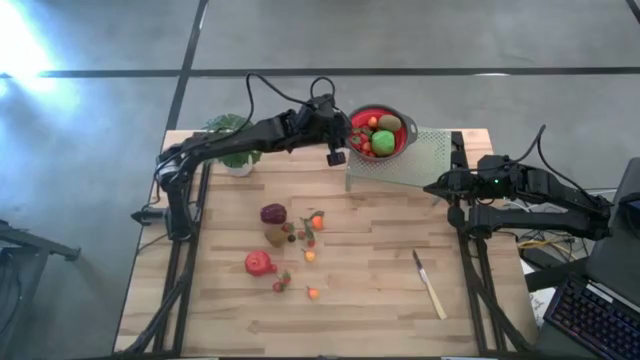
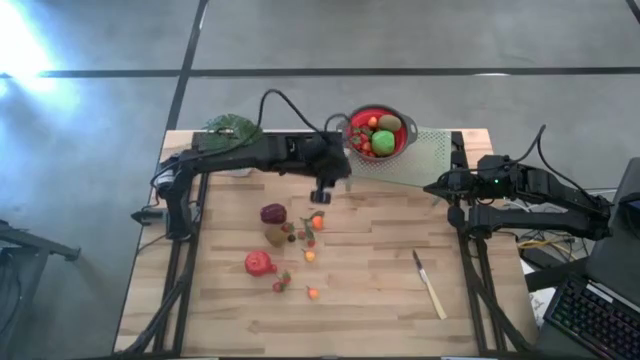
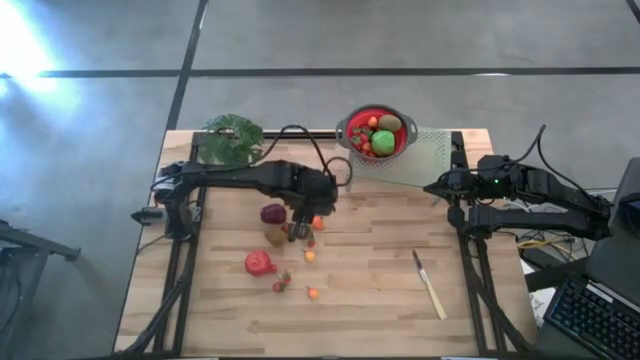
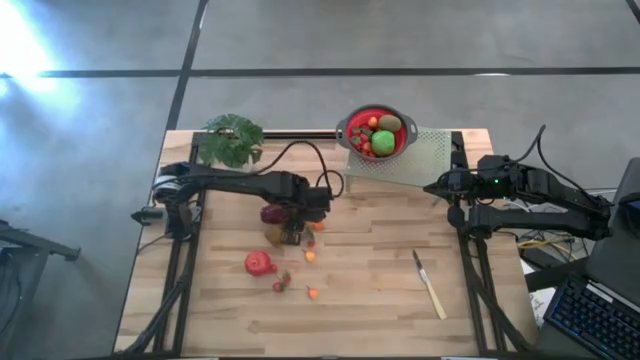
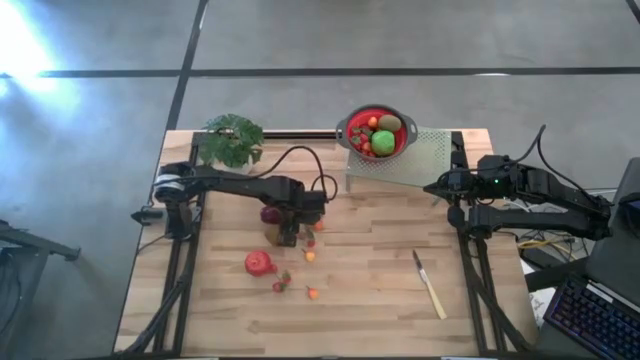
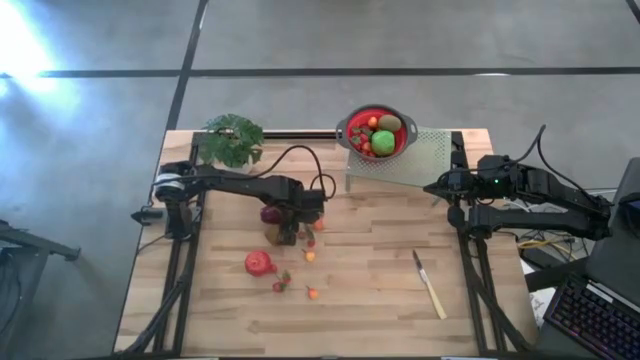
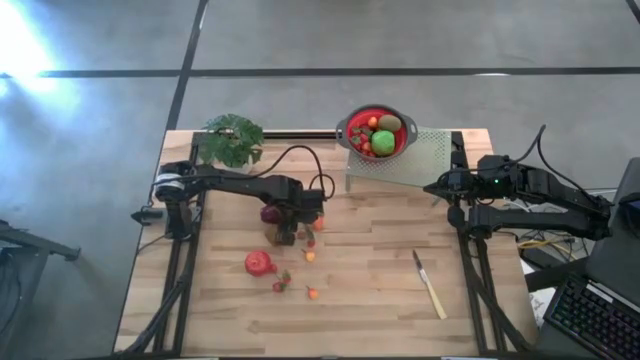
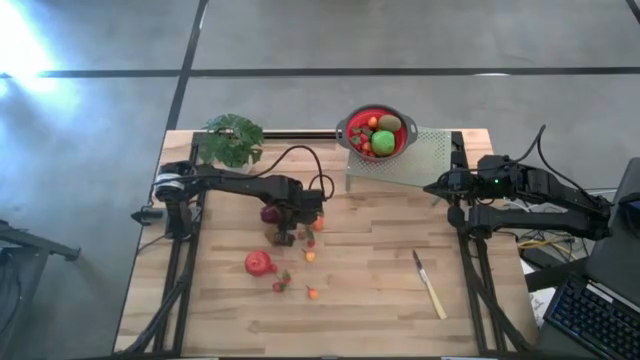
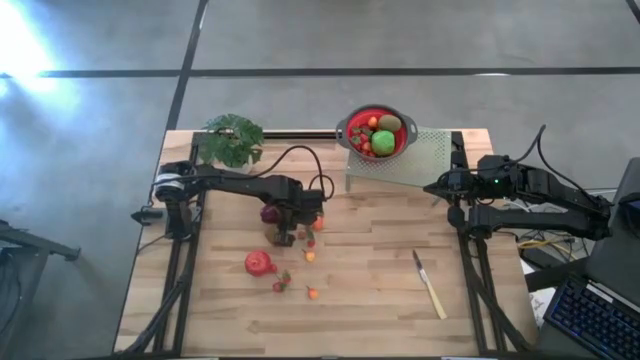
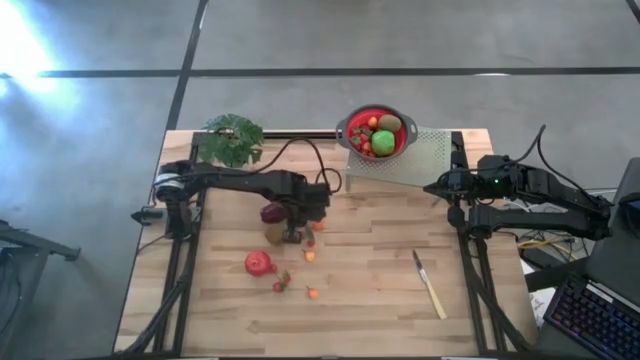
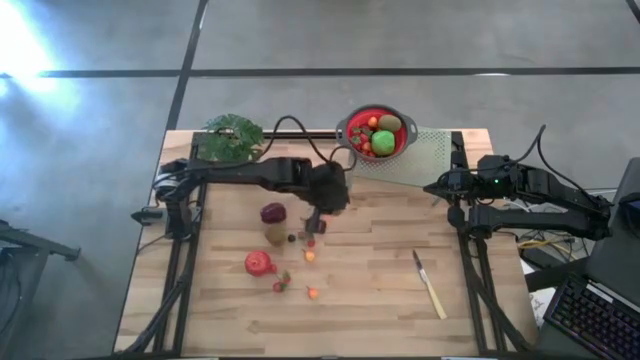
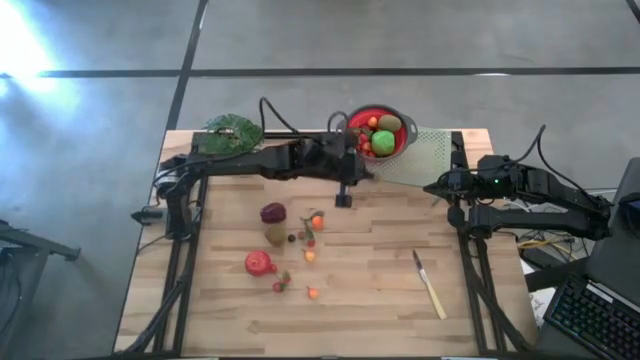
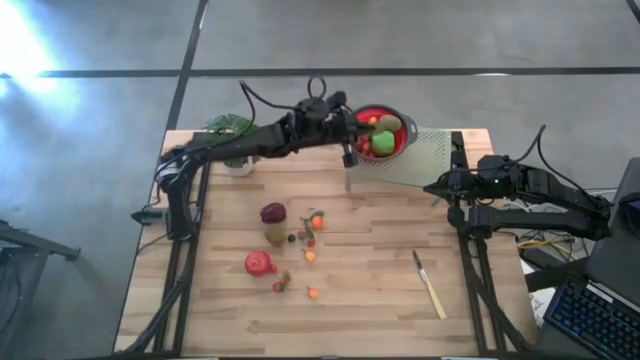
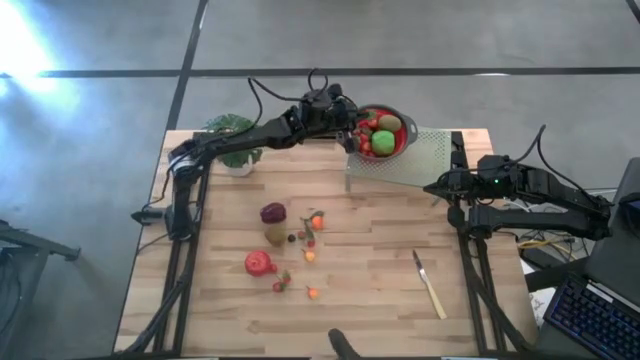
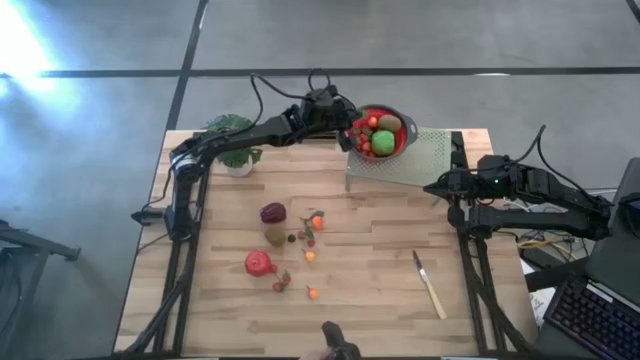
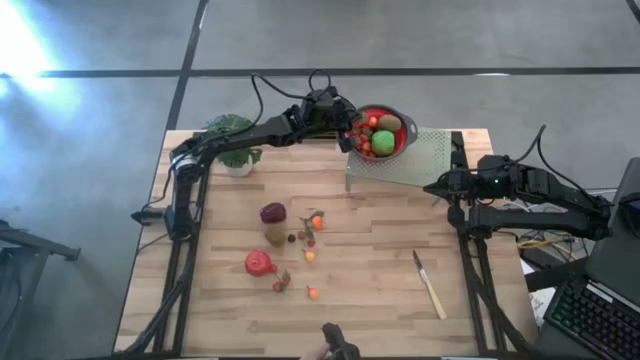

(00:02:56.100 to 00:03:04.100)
Task: Pick & Place Fruit
Put the strawberry into the strainer bowl on the shelf

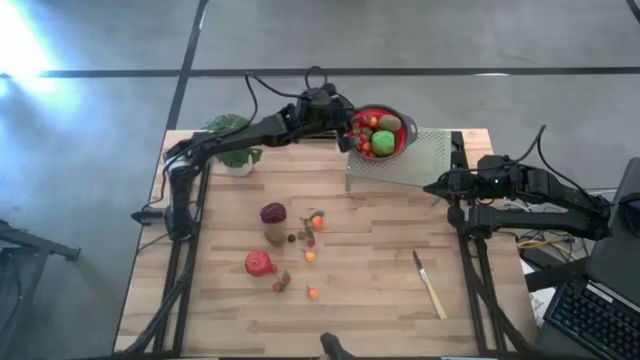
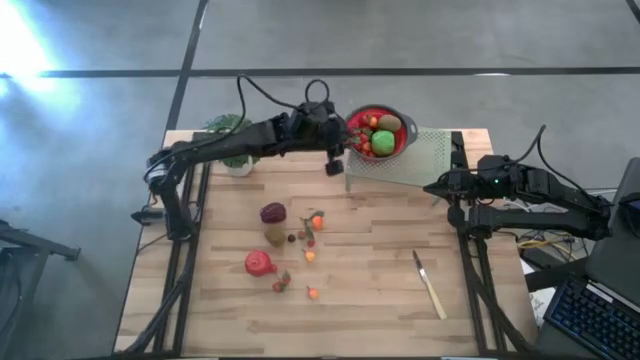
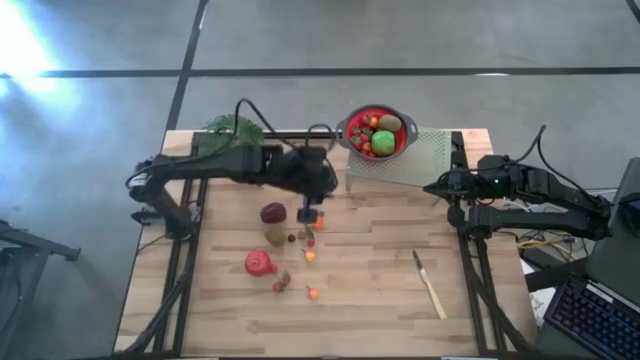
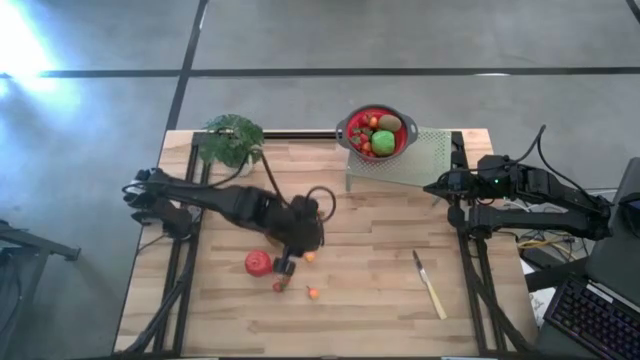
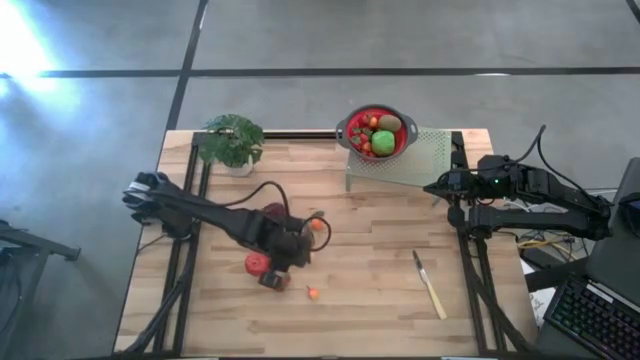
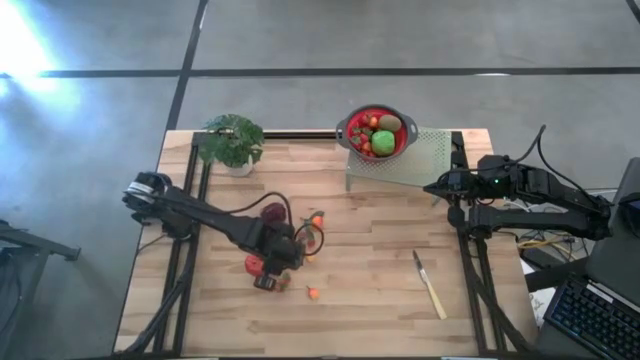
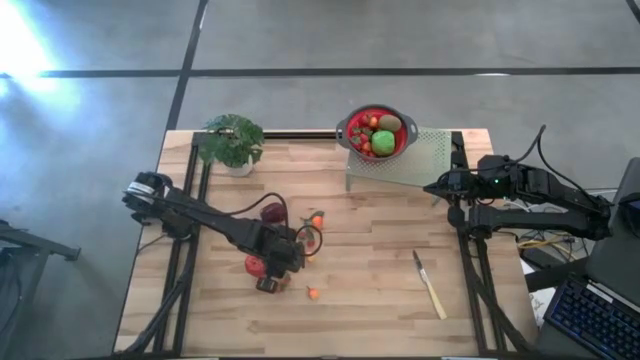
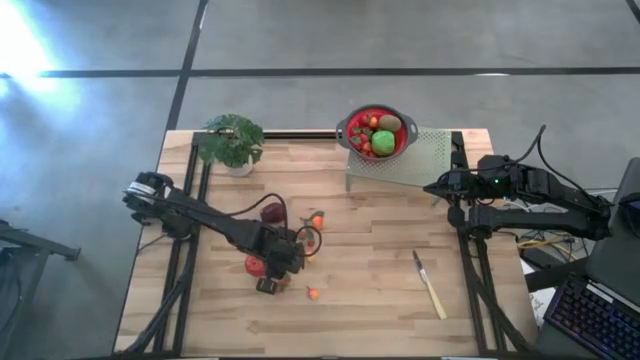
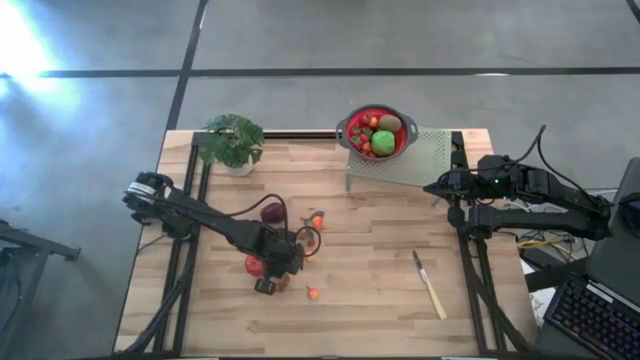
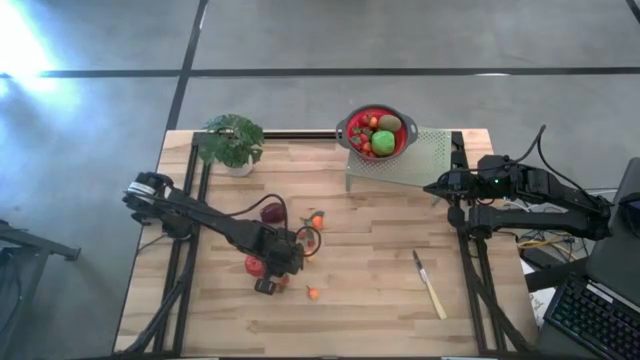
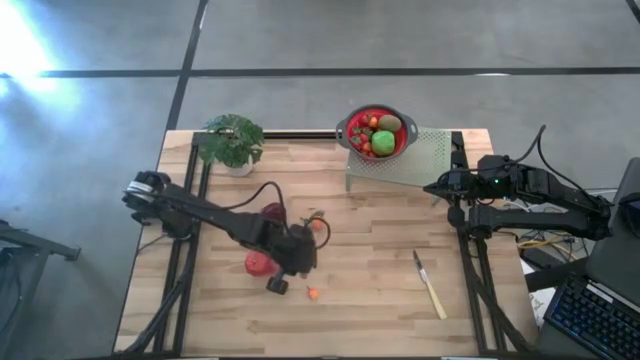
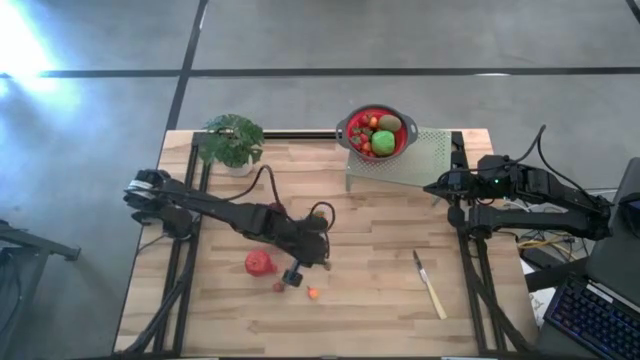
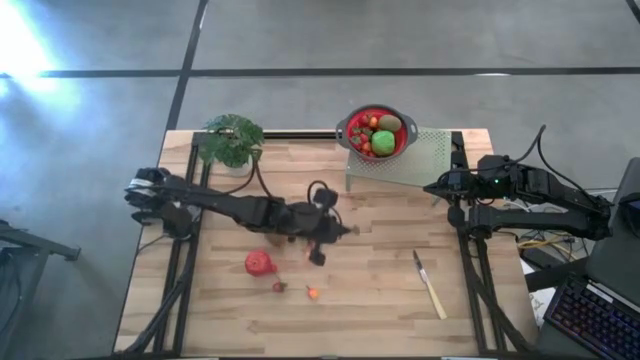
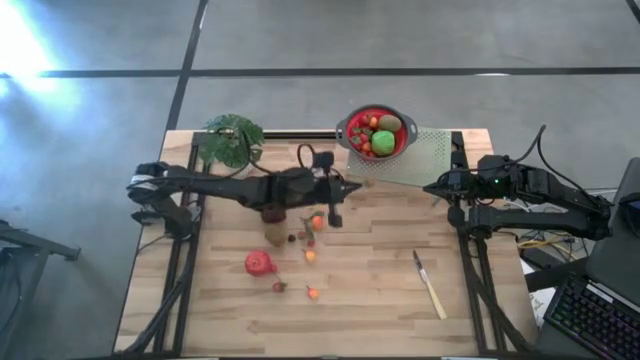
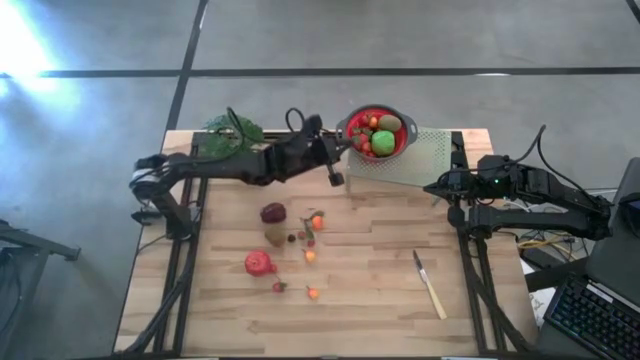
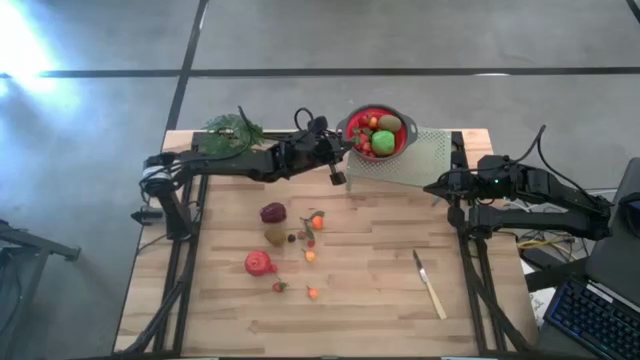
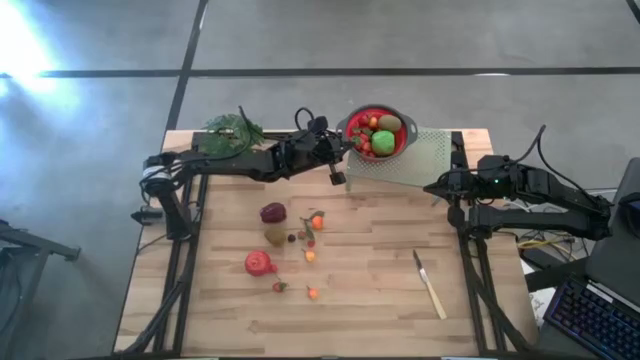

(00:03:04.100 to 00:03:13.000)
Put the strawberry into the strainer bowl on the shelf
